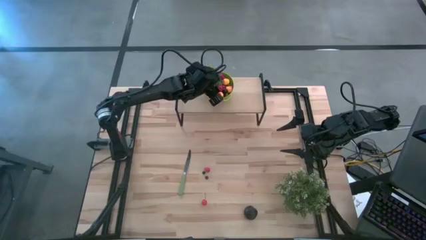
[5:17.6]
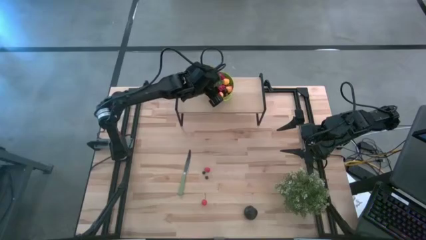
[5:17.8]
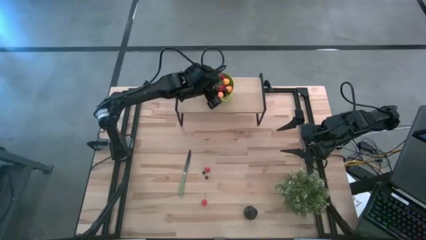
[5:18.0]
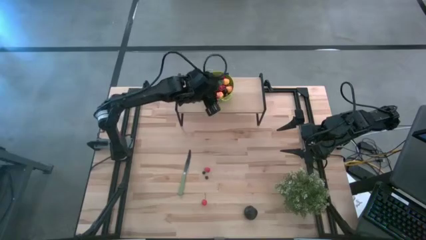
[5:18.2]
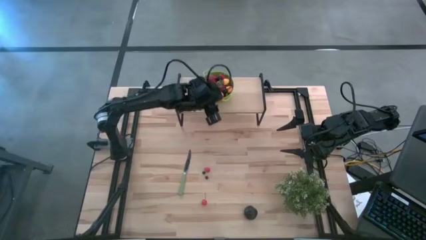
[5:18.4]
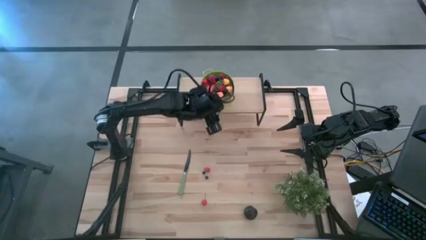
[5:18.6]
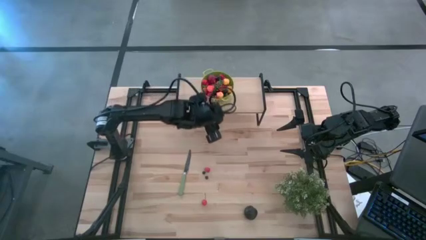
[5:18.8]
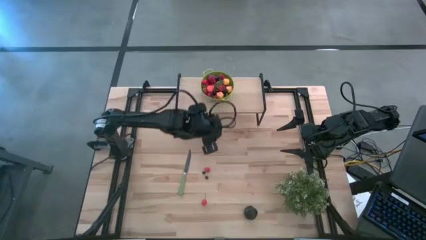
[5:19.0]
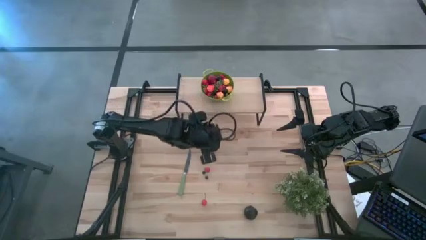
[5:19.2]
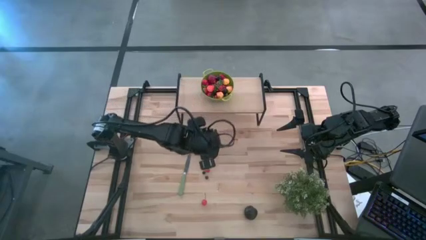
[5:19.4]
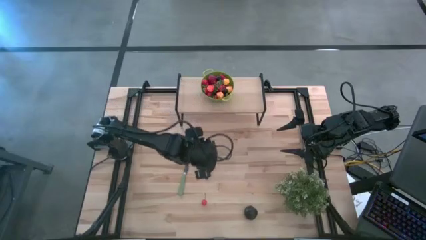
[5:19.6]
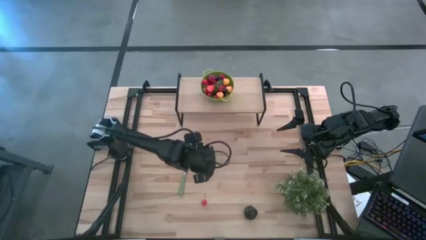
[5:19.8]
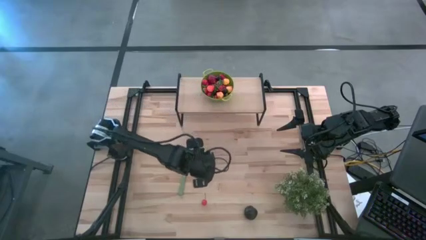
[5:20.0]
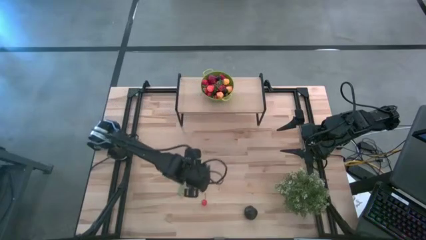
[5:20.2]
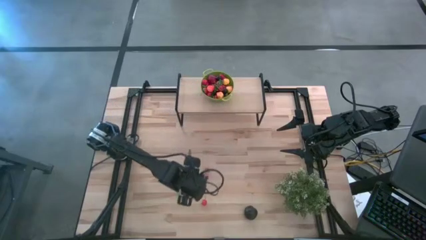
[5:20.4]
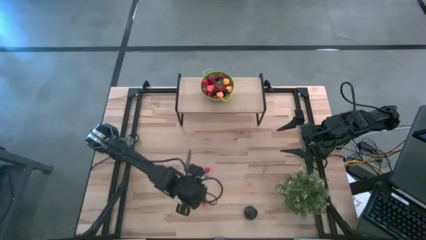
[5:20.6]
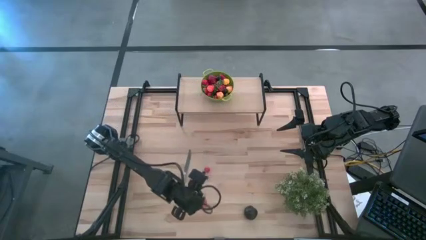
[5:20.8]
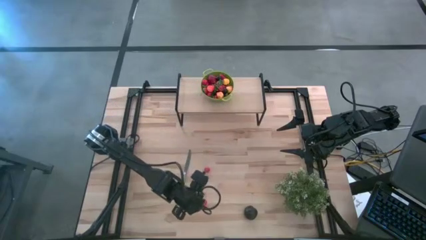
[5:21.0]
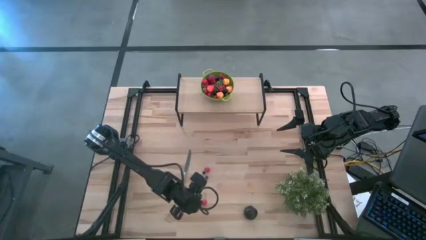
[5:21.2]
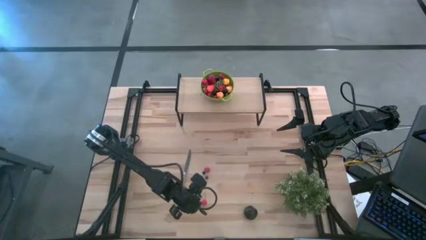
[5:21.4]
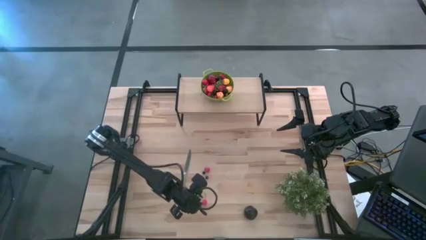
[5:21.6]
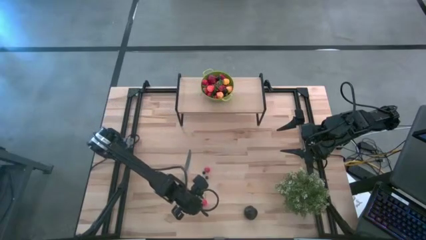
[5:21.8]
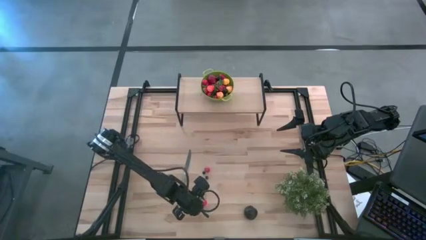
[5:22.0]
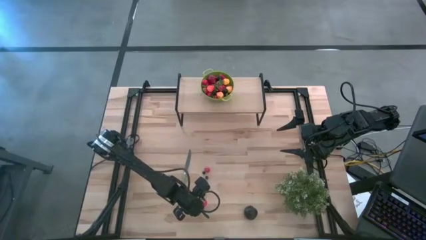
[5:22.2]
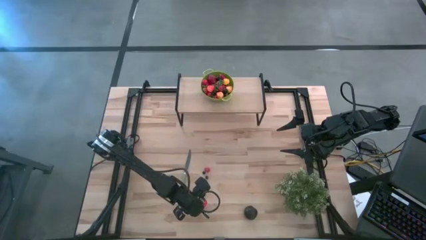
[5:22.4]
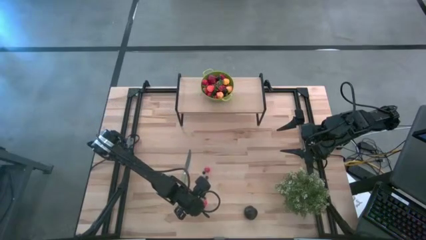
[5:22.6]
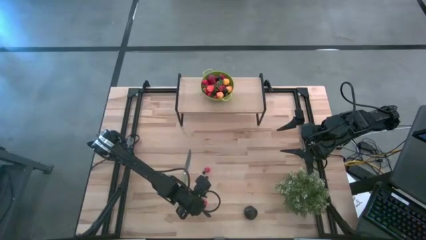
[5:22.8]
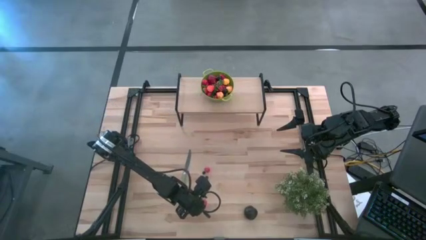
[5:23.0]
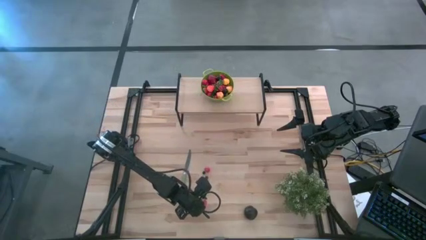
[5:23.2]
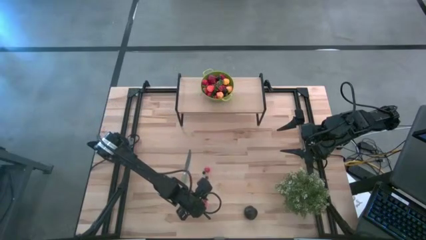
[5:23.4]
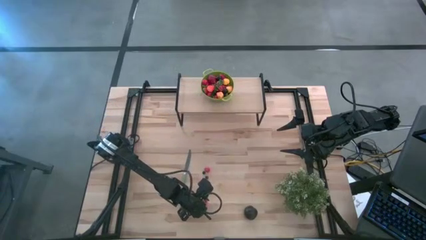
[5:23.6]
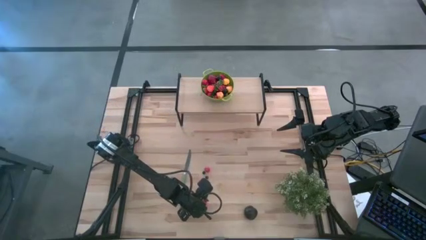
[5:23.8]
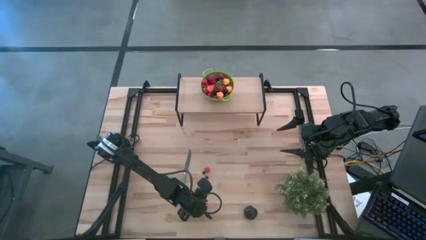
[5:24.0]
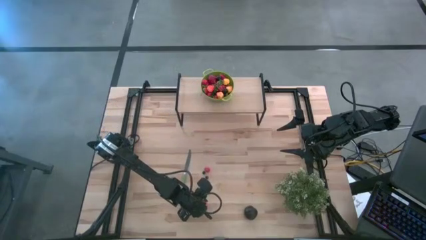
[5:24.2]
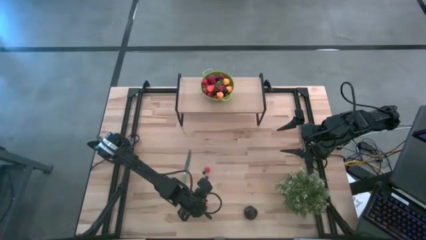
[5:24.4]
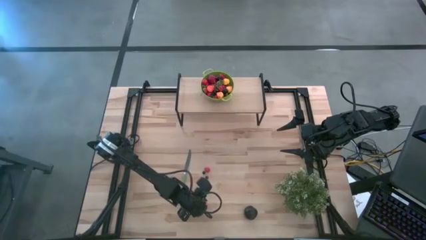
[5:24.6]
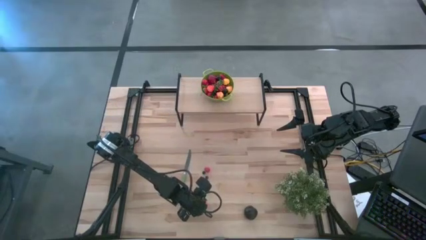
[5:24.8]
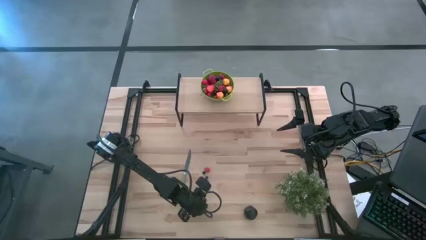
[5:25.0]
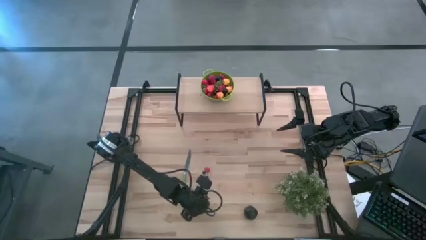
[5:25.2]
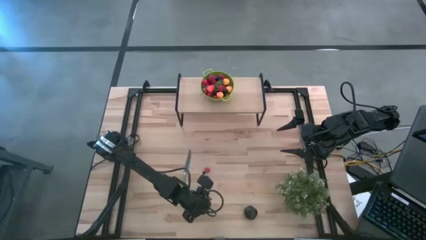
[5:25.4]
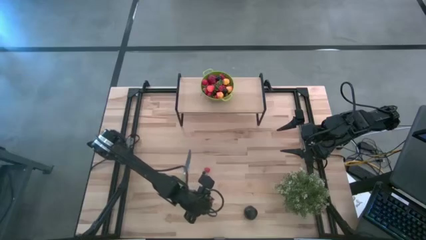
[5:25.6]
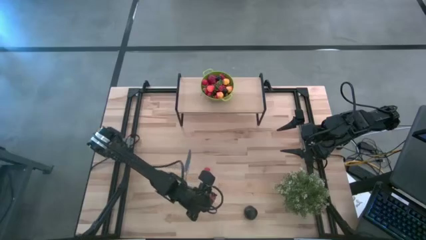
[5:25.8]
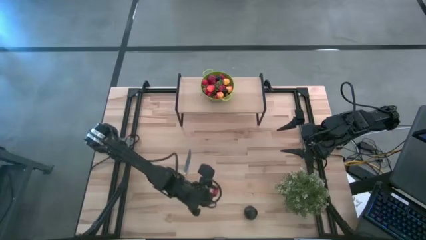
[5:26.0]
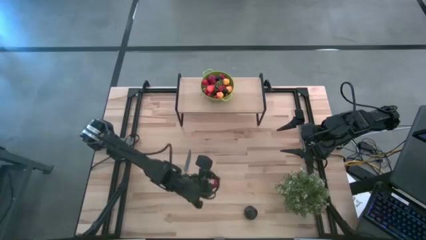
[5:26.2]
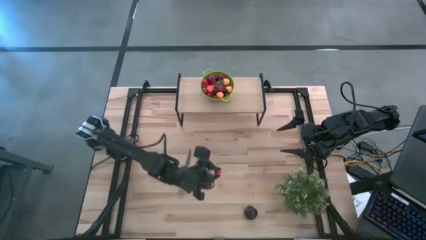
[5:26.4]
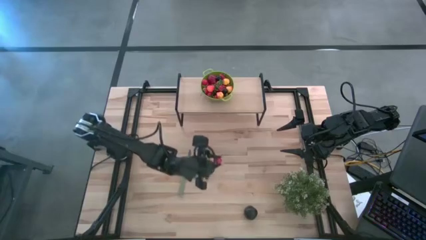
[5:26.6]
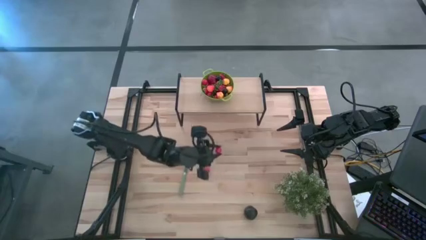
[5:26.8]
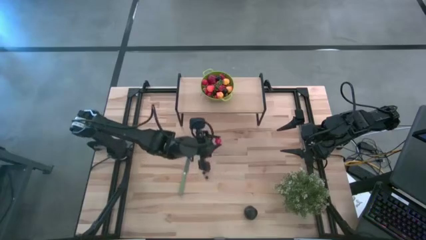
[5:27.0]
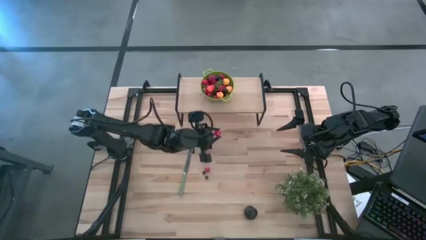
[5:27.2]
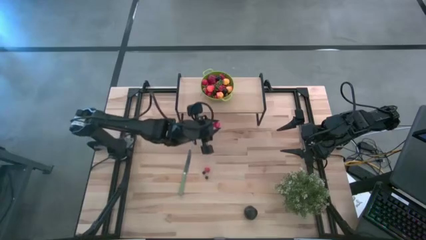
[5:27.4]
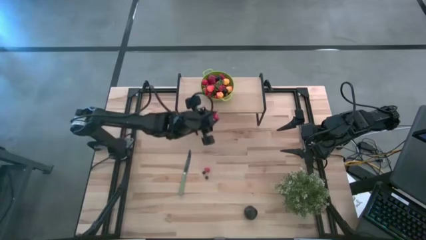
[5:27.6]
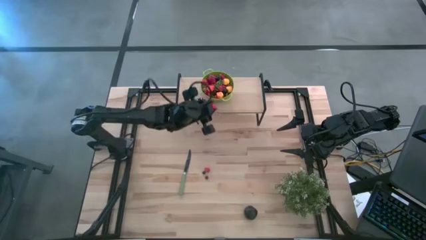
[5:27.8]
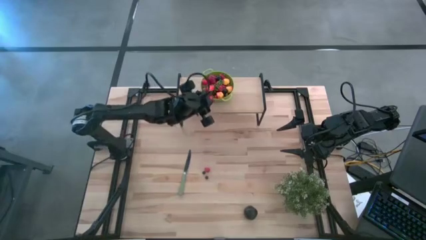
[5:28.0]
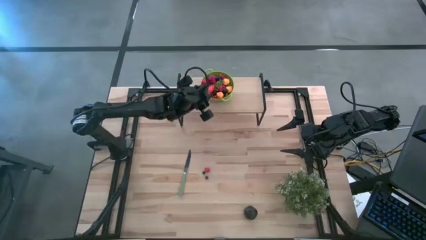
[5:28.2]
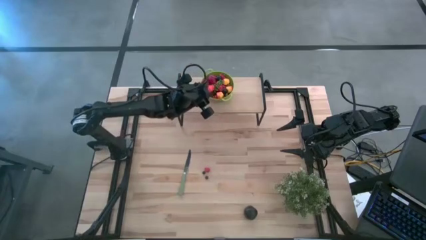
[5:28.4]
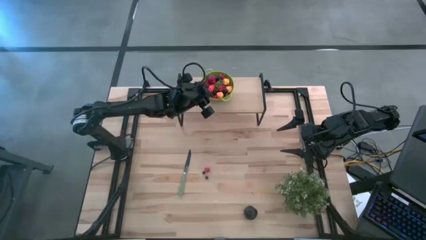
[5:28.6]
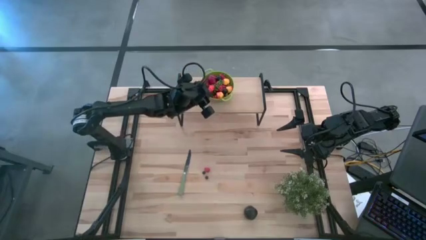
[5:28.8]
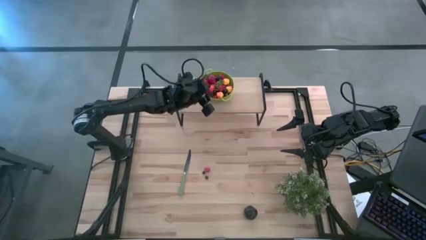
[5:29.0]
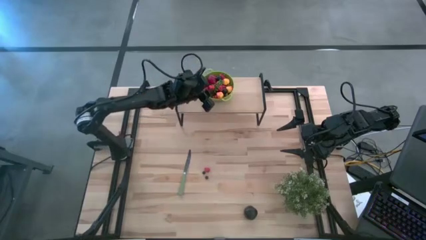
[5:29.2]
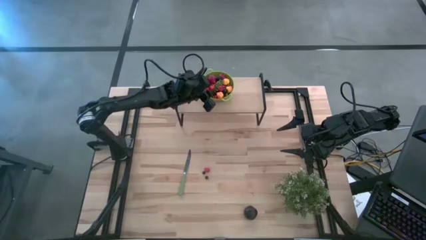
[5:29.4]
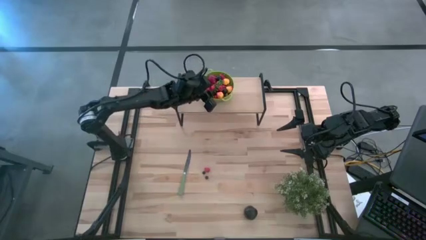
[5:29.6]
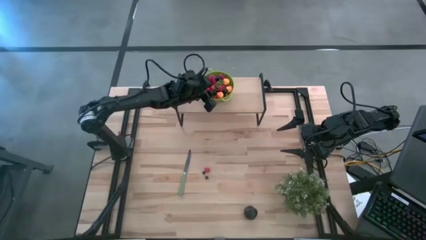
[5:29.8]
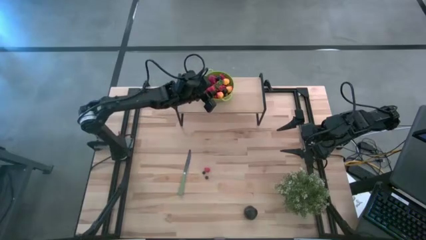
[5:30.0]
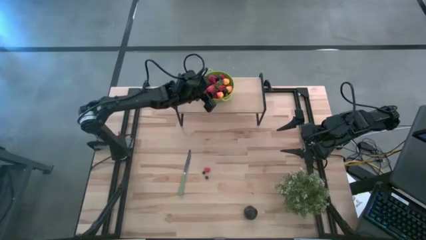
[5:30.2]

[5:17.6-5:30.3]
Task: Pick & Place Fruit
Put the red cherry into the green colander on the shelf
